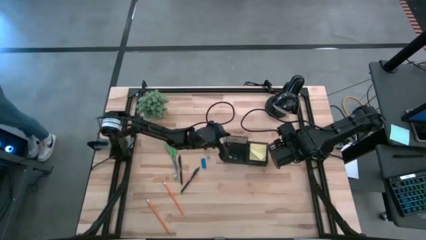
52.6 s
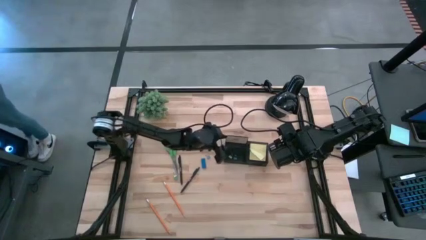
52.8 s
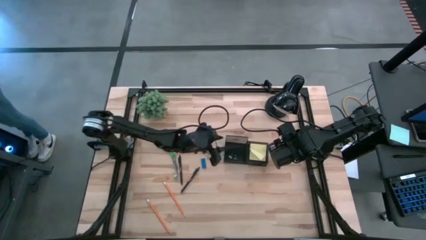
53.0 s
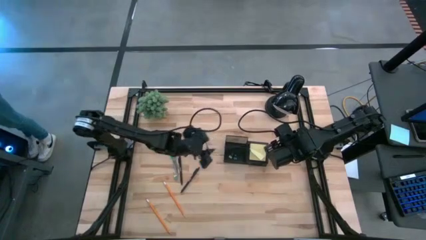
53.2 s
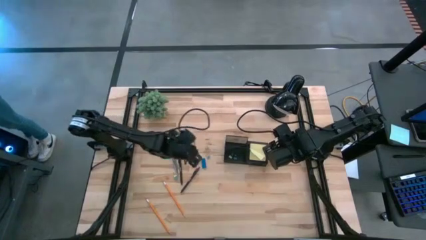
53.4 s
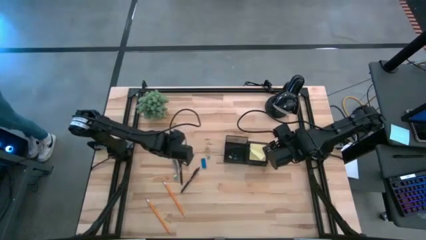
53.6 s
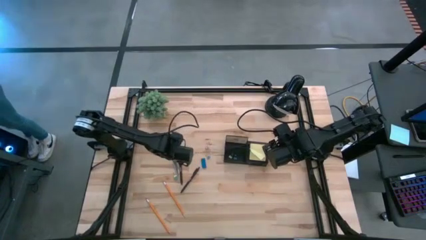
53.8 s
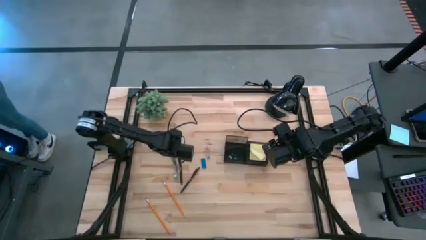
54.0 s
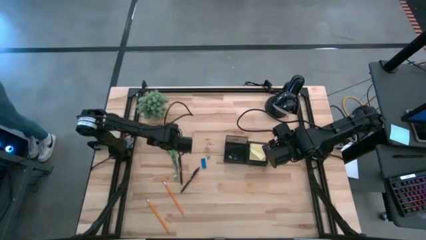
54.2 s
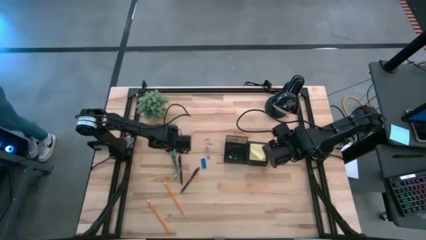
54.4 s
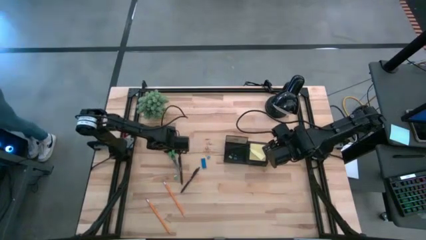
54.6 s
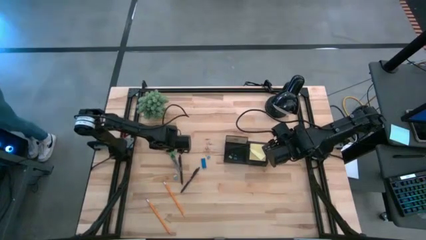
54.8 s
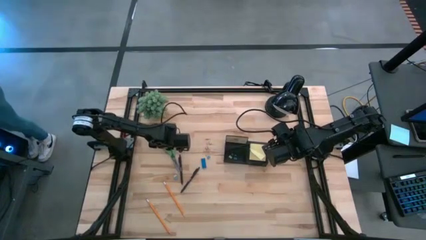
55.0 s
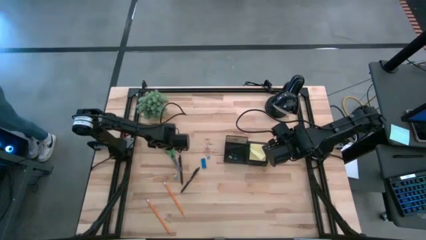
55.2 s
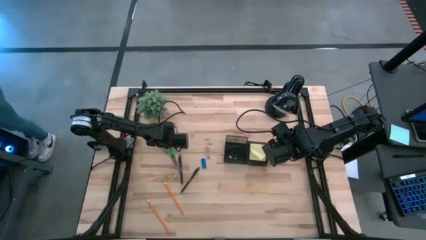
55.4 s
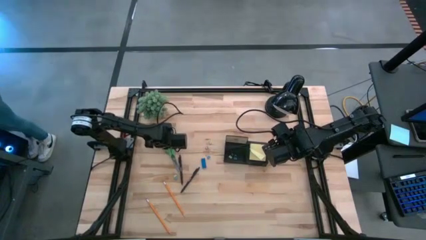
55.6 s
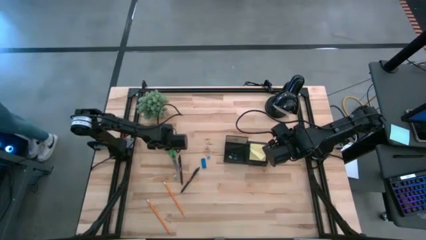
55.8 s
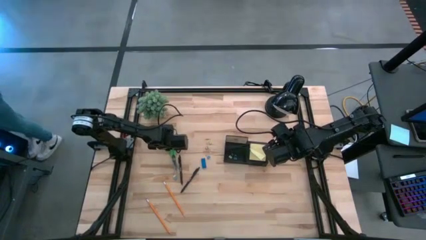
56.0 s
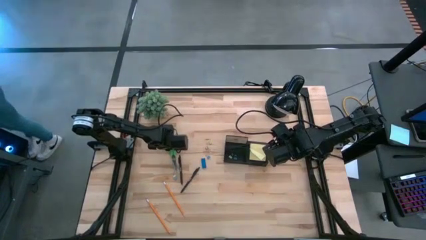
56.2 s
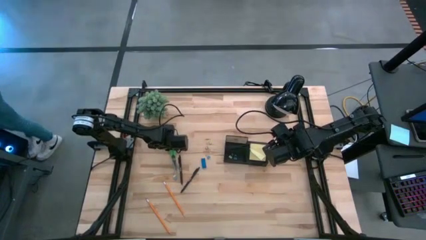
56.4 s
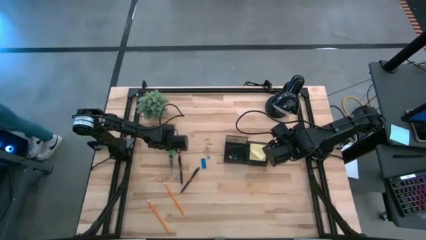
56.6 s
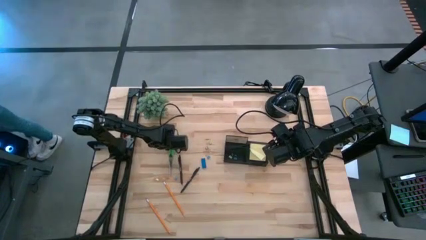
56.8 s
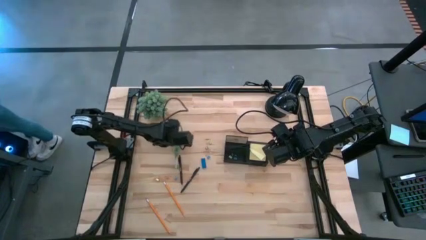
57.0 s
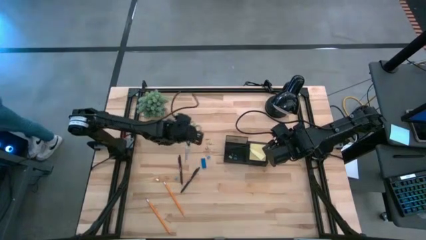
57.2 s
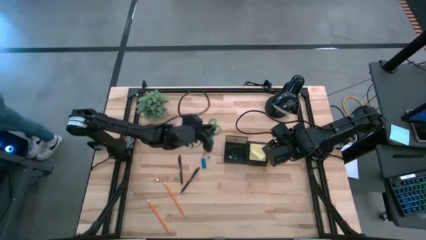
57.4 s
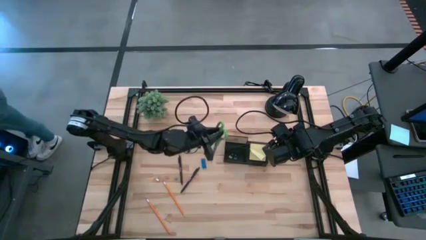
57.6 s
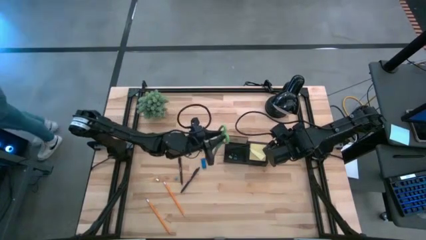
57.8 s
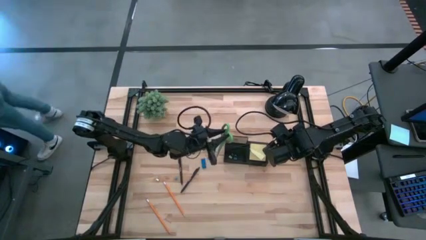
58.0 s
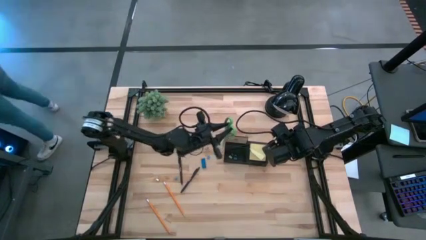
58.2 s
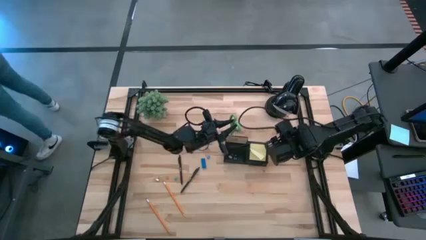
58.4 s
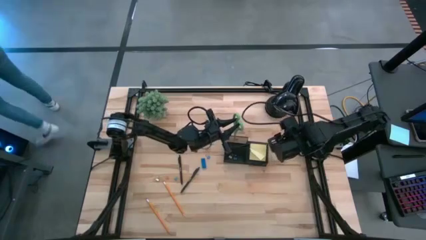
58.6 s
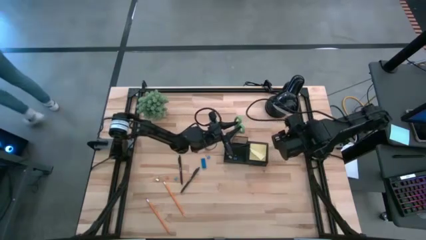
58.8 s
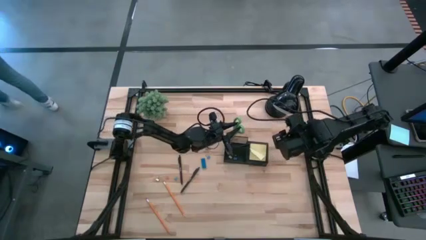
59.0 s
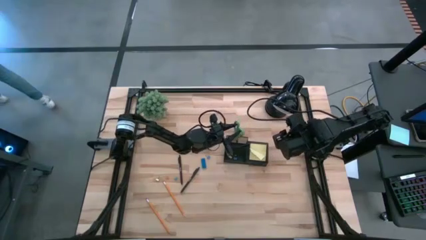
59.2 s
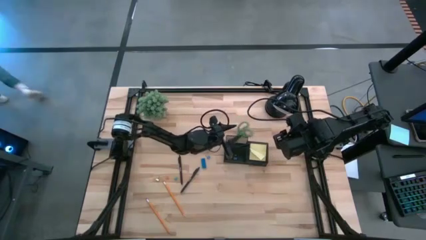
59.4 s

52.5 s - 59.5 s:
Task: Pick and place office supplies into organizer
Put the green scissor into the black mesh organizer

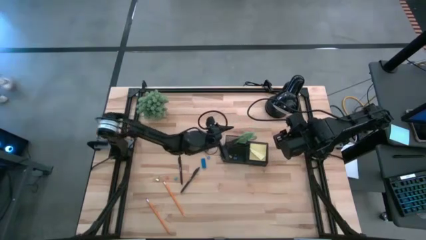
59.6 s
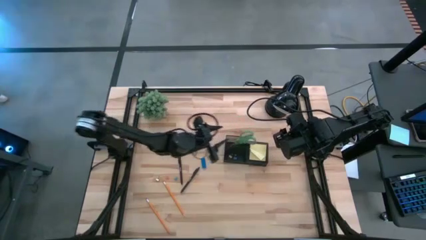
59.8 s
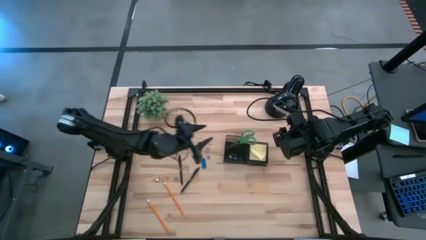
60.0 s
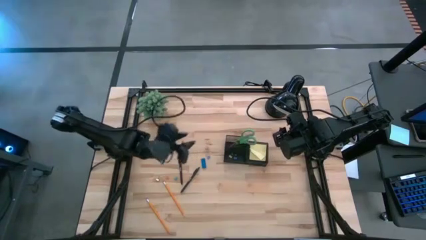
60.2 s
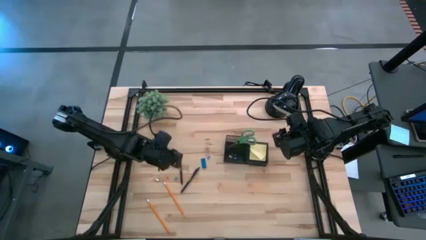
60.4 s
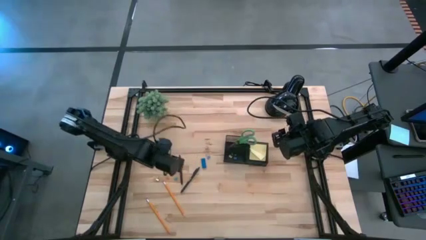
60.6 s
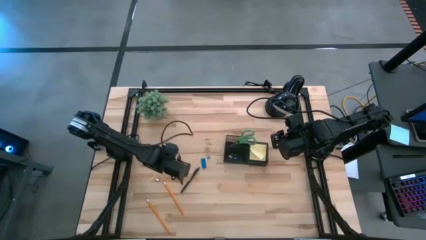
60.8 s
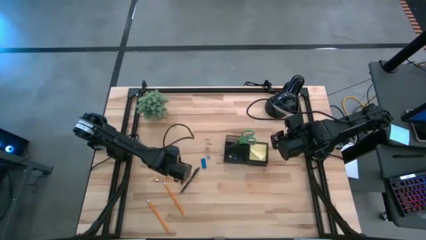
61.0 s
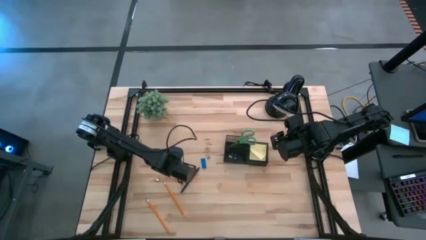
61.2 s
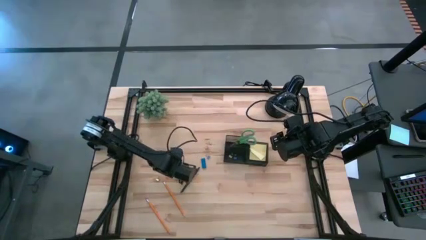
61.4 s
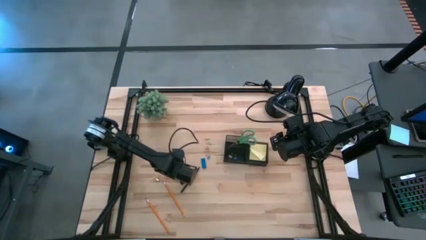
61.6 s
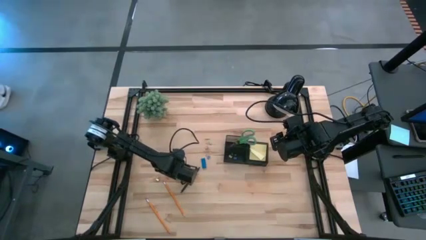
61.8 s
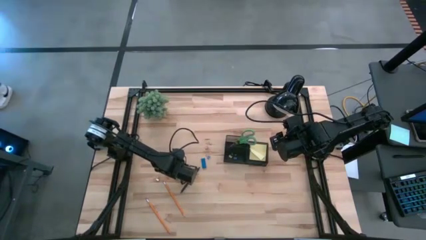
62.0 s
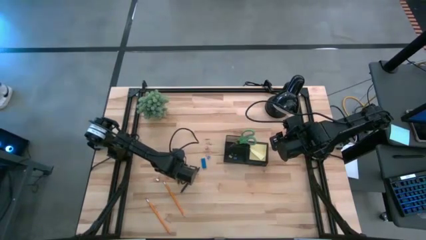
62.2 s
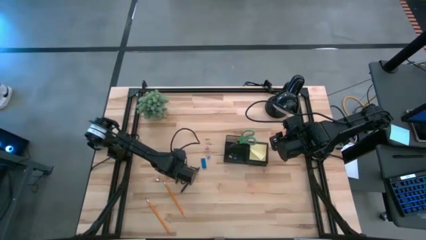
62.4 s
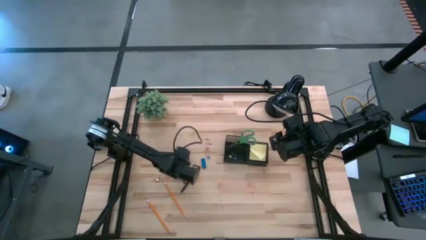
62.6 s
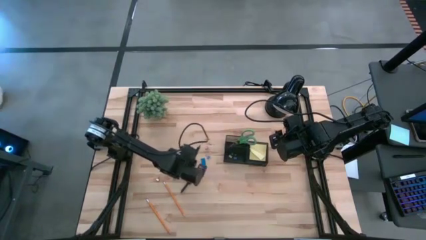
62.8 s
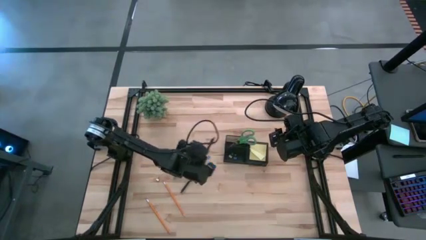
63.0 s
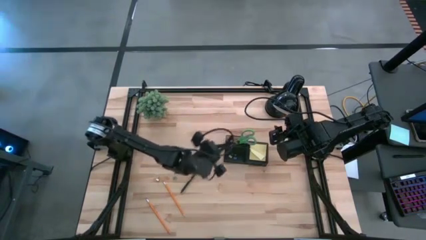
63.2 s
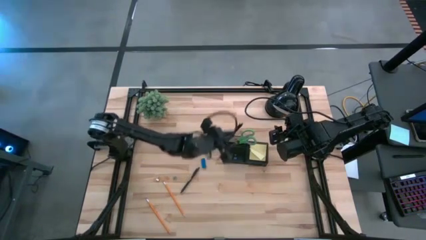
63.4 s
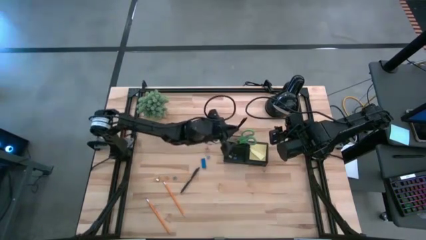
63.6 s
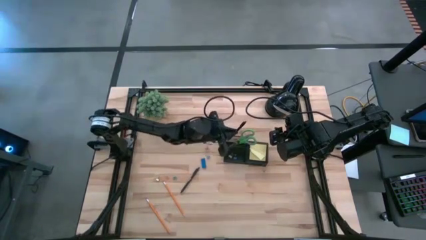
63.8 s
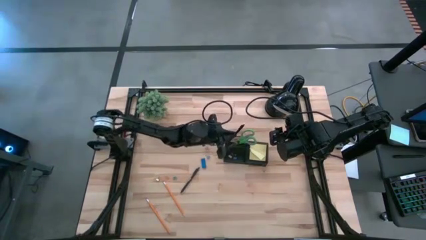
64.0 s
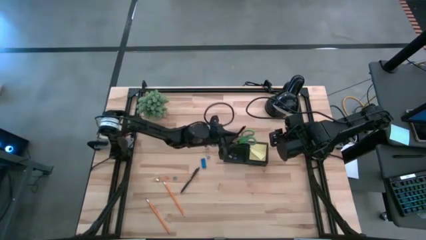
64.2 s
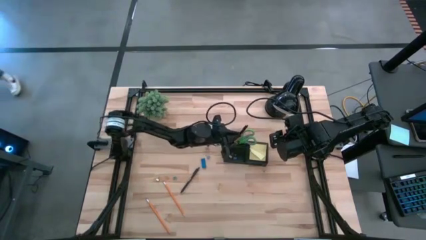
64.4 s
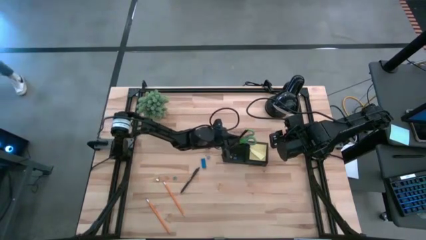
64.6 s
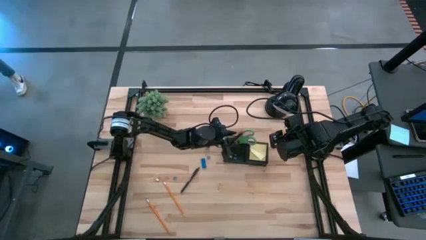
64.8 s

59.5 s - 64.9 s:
Put the left black ballpen into the black mesh organizer

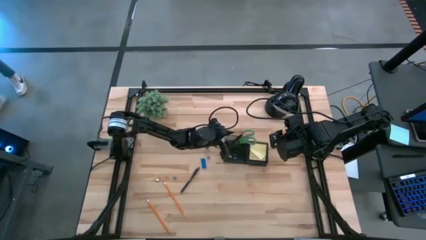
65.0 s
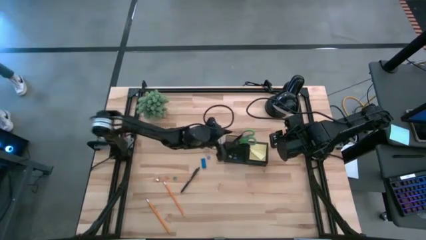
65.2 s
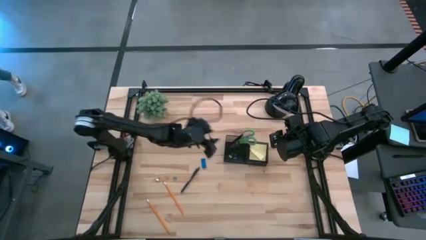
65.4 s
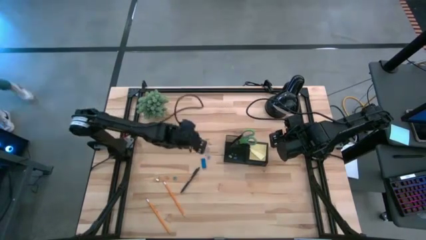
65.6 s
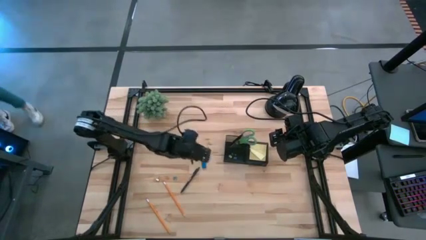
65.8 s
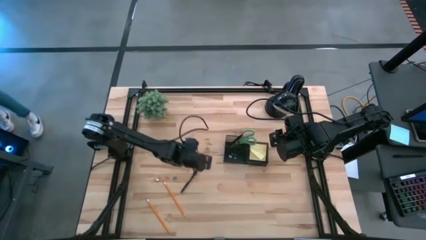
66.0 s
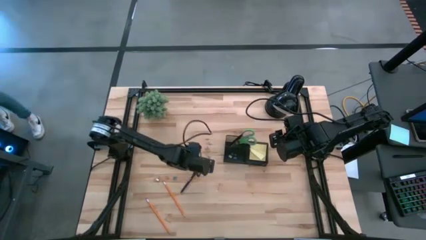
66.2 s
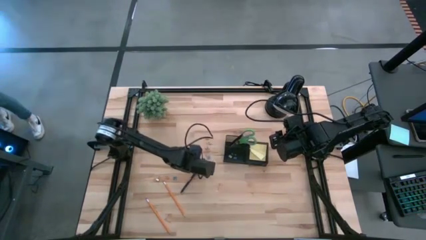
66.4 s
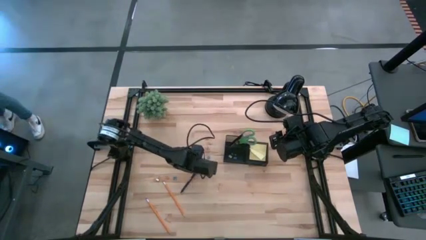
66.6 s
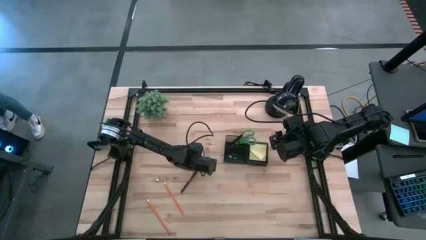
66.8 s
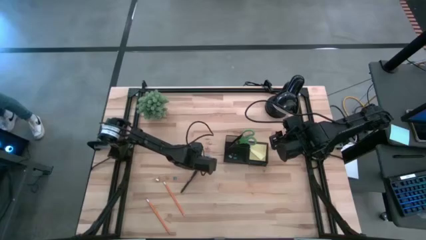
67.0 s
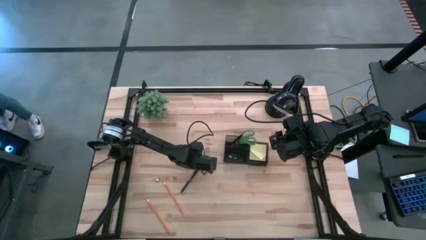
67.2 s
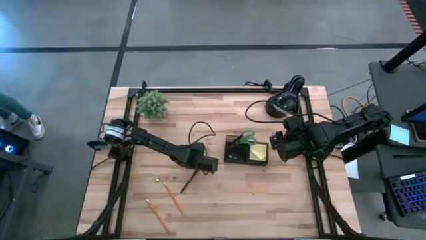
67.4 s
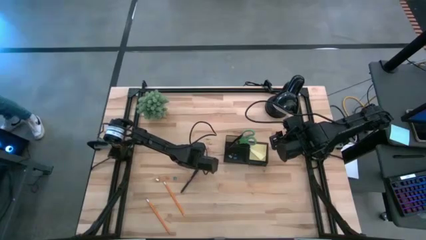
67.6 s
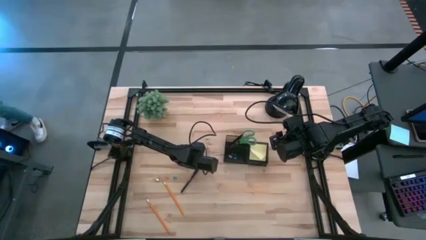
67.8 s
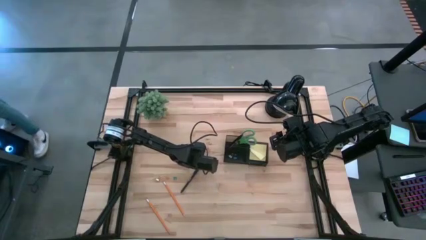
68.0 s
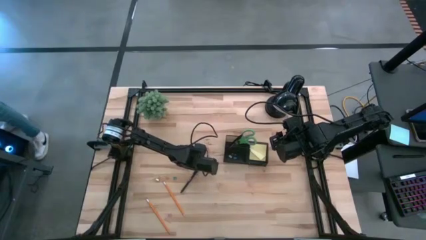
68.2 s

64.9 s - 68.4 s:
Put the blue eraser into the black mesh organizer
